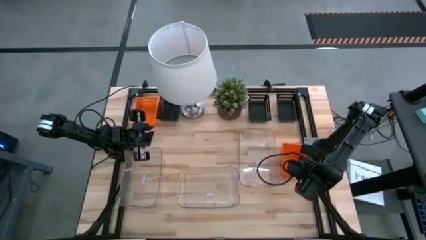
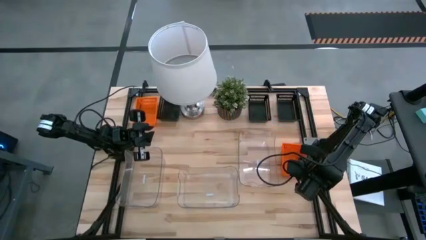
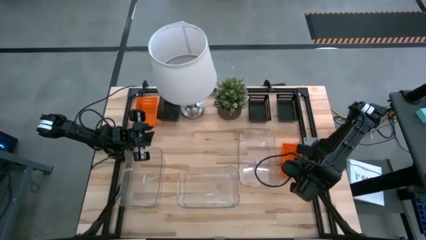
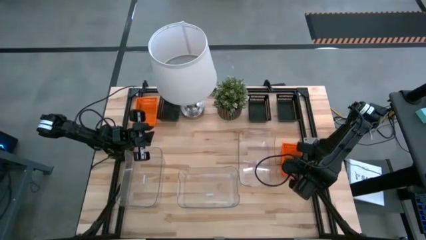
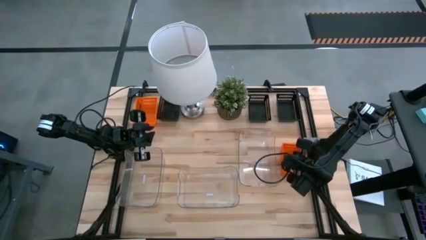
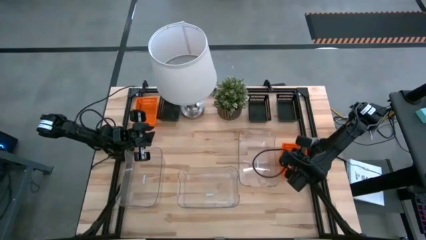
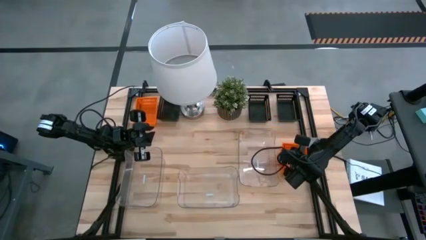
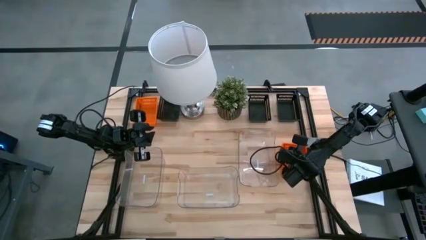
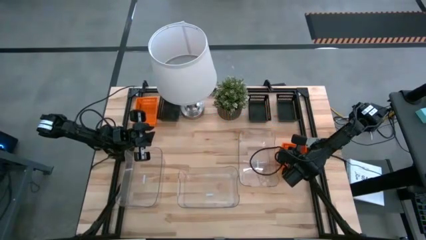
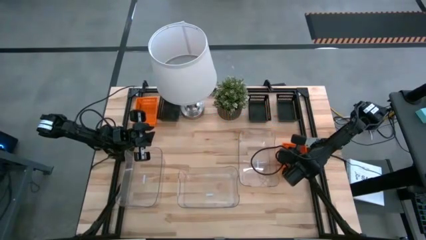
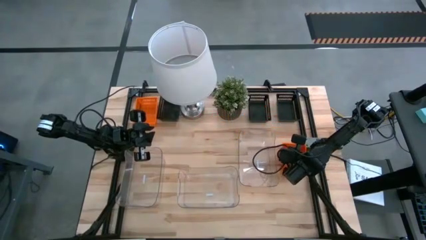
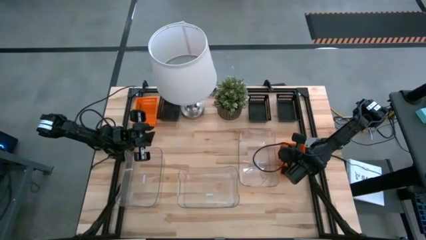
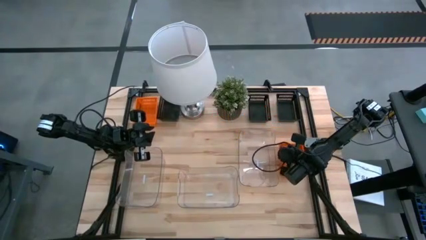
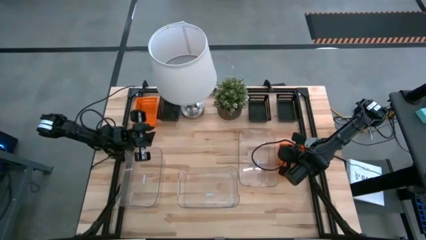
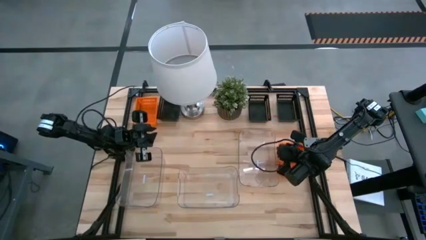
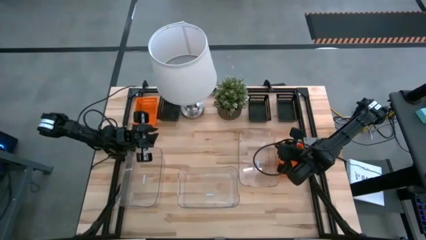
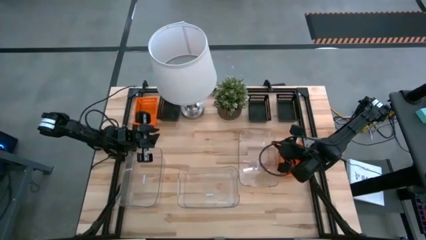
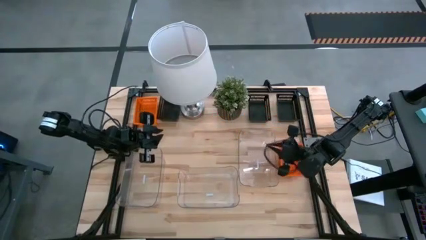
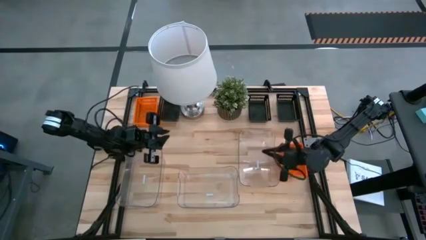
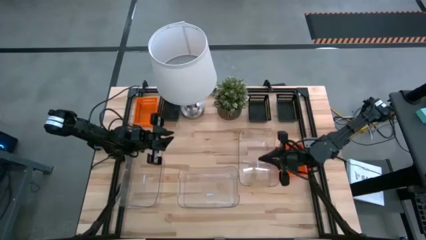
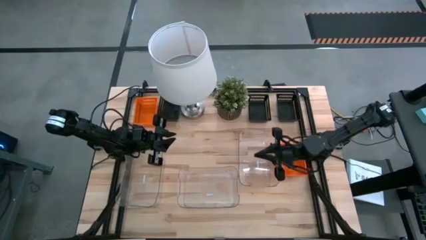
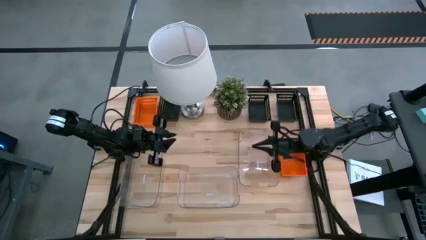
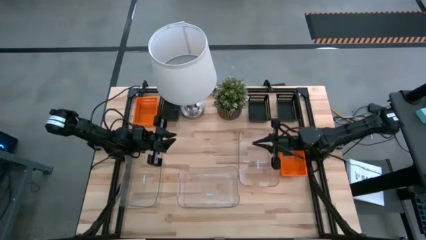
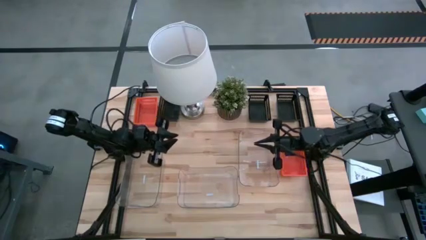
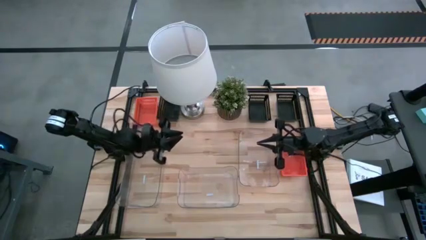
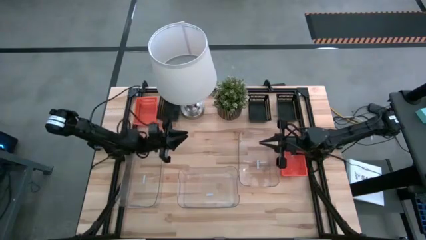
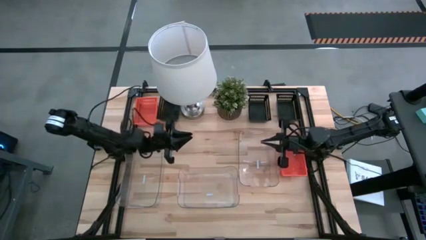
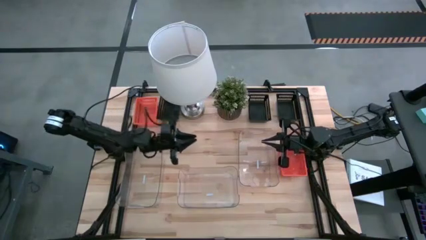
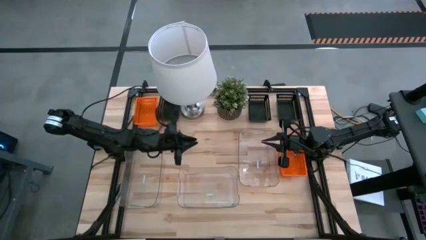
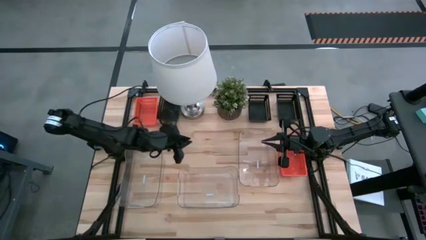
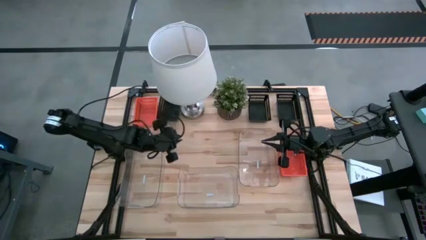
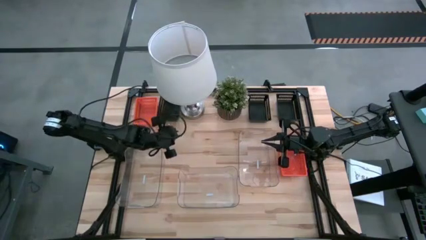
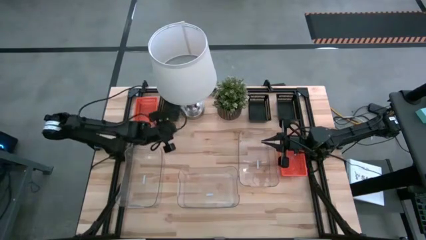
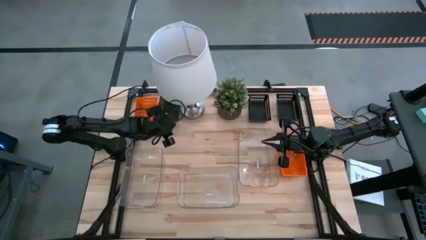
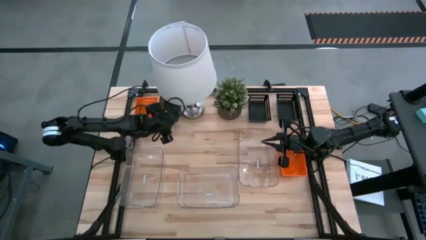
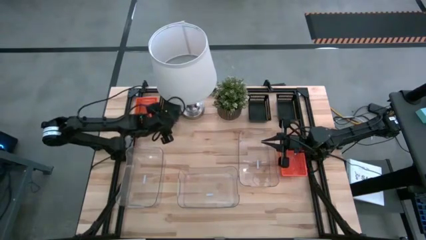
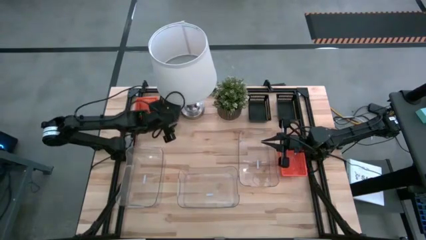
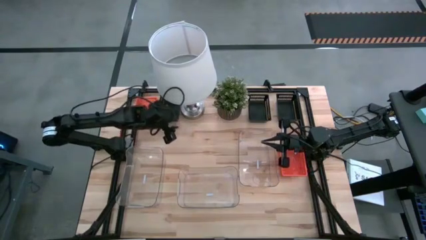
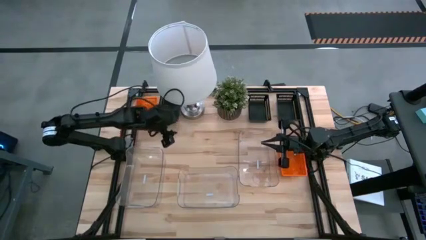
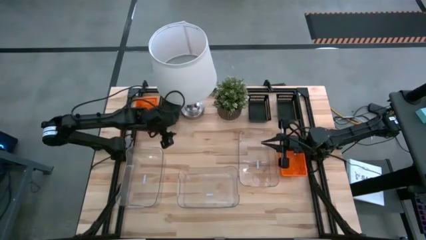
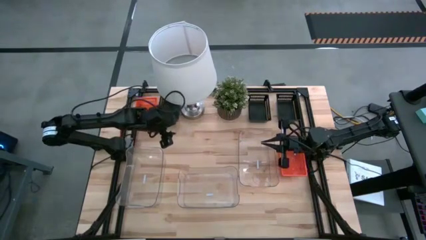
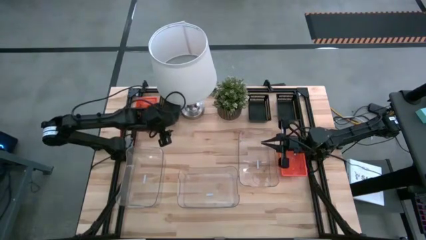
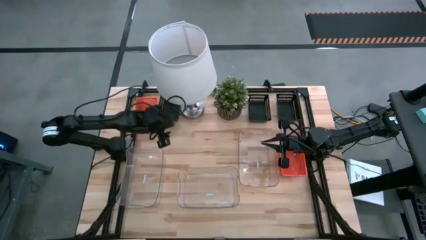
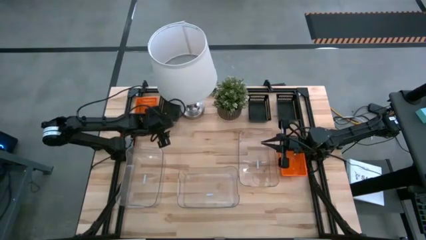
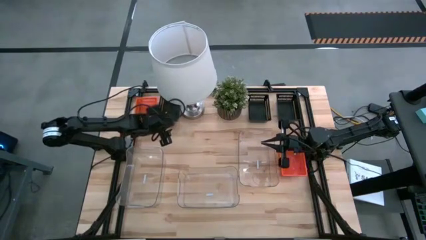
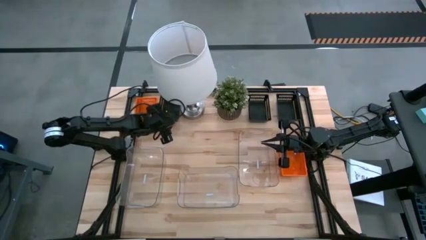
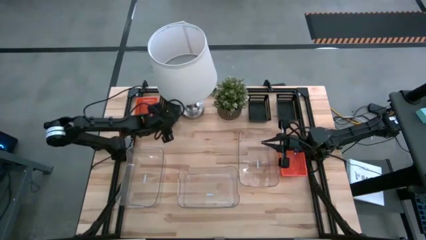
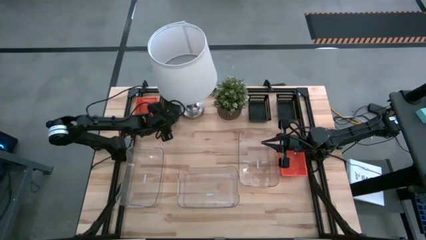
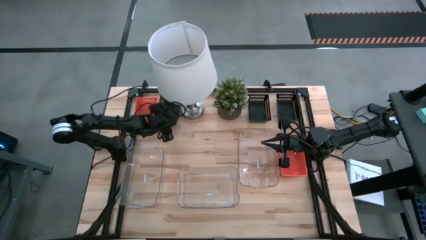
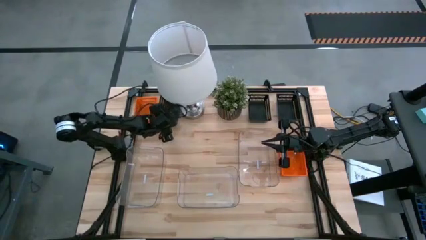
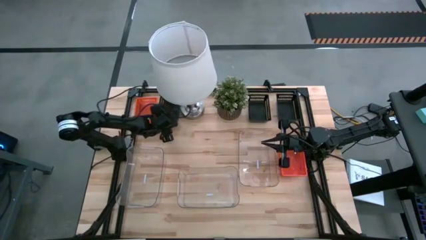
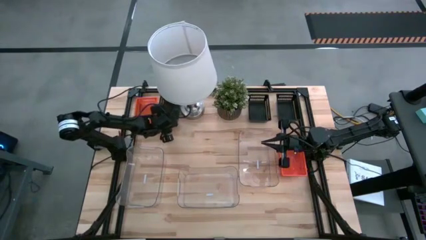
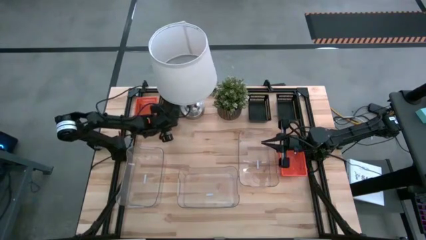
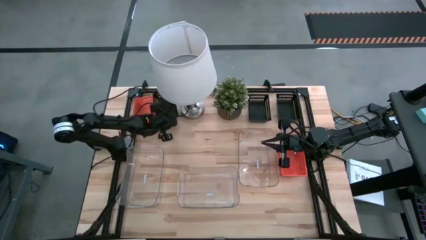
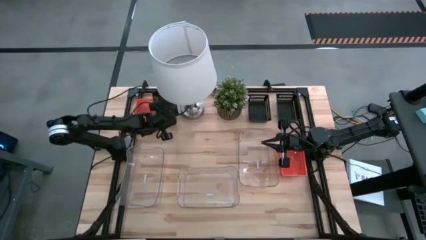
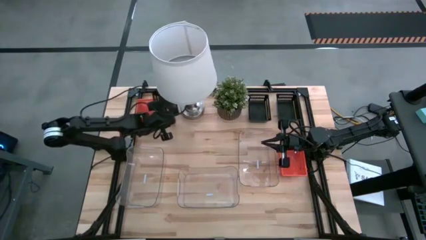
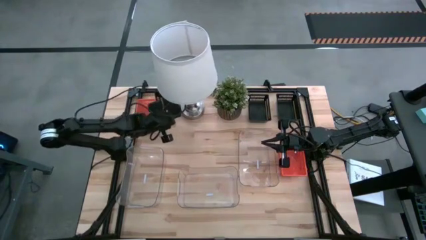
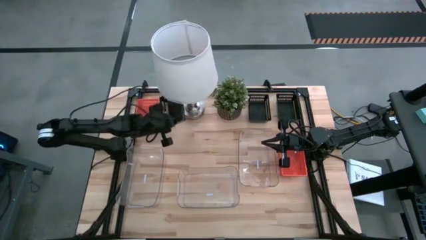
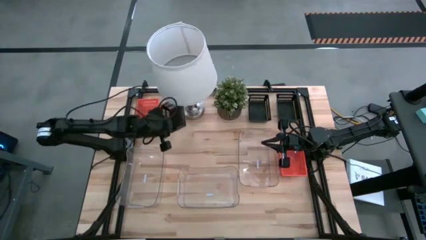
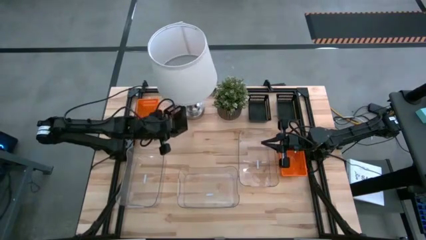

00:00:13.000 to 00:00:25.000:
Stack the left black bin on the top left black bin

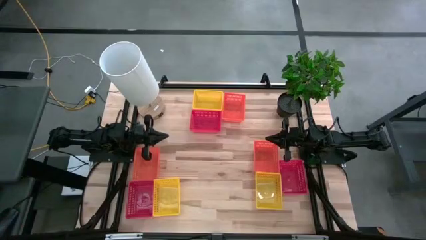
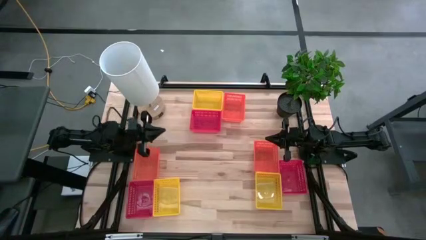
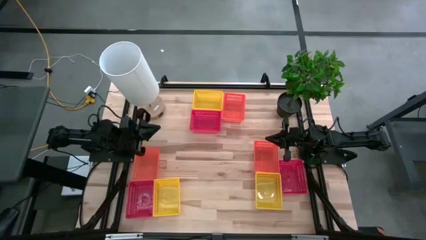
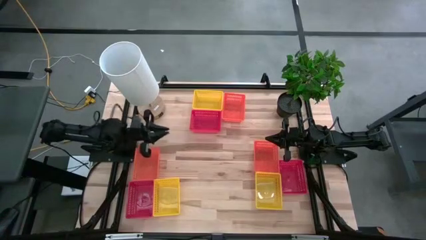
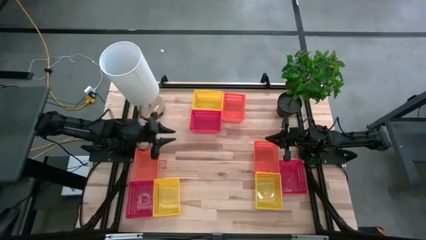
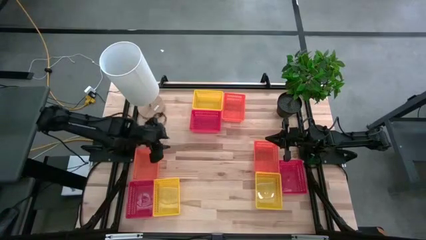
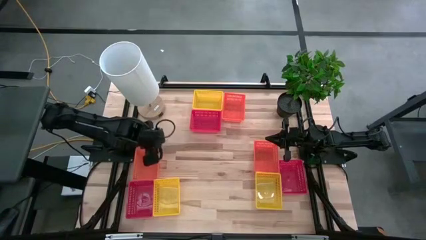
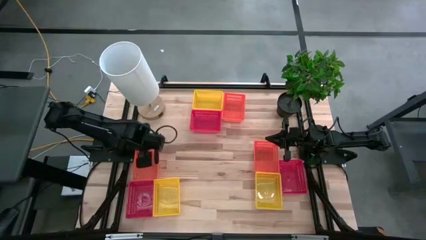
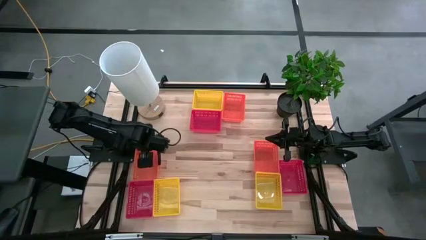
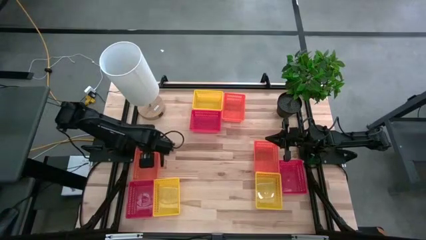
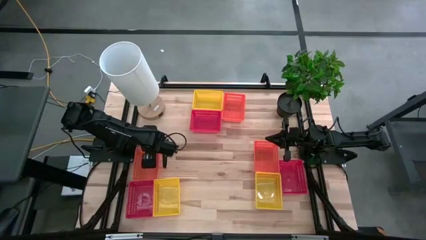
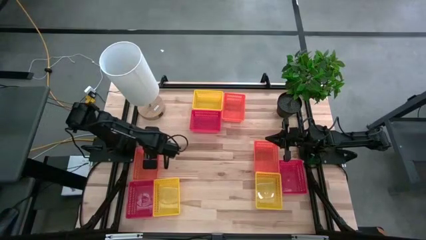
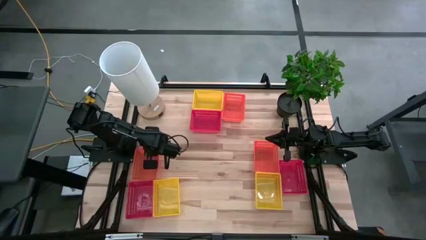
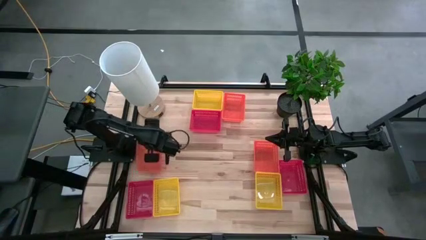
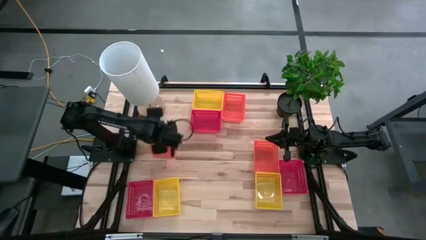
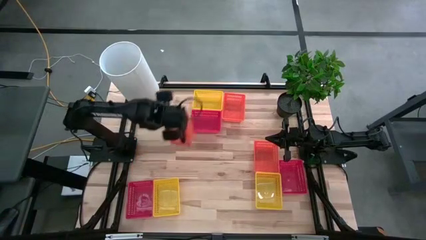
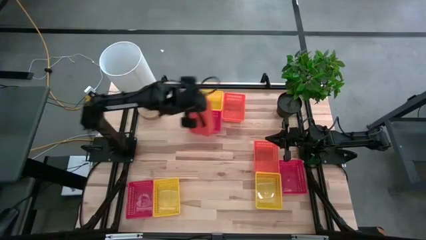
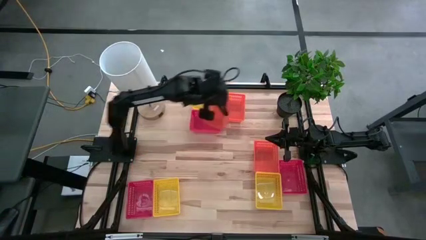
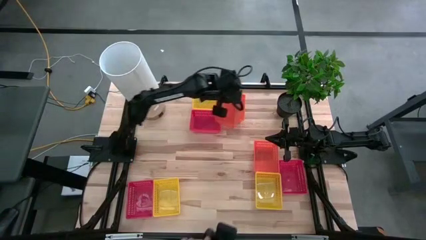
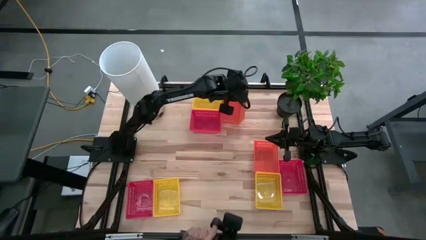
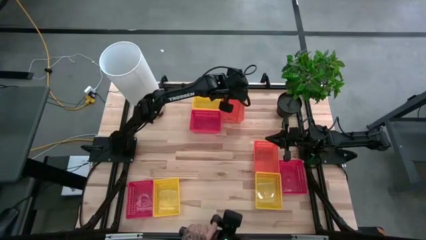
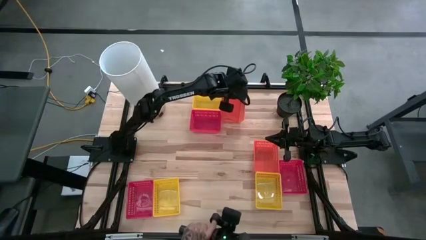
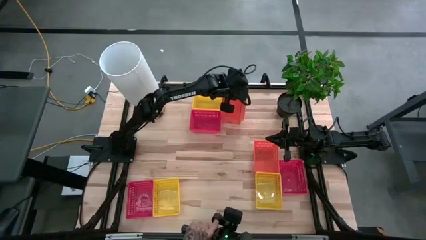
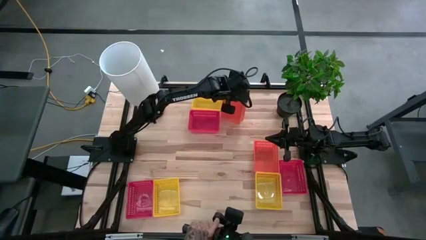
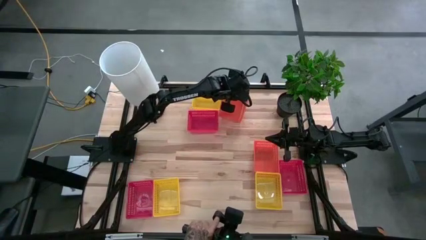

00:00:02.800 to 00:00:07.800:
Stack the left orange bin on the top orange bin
